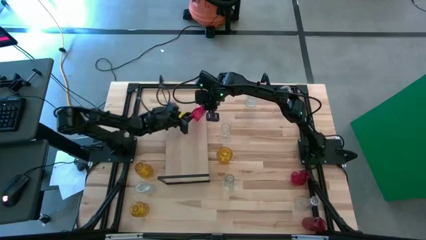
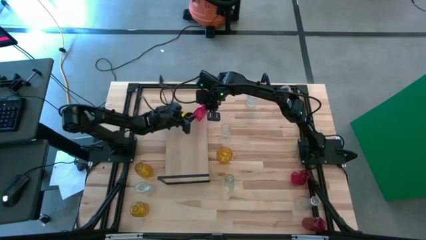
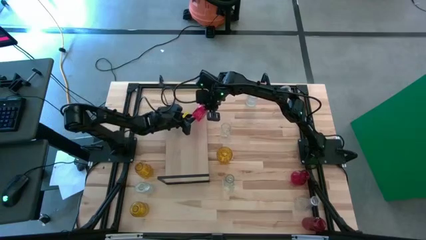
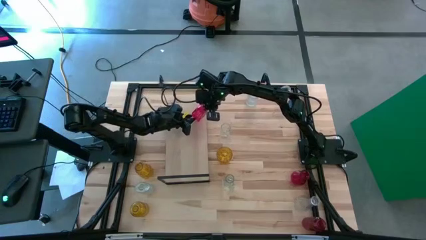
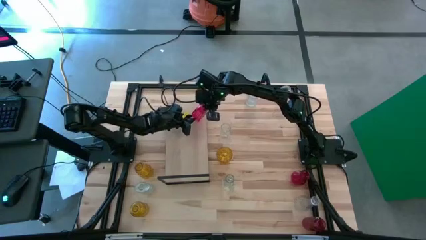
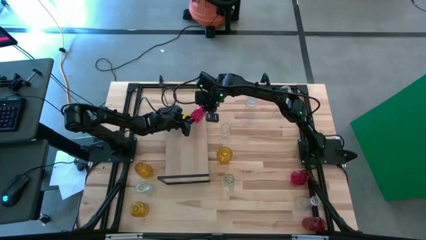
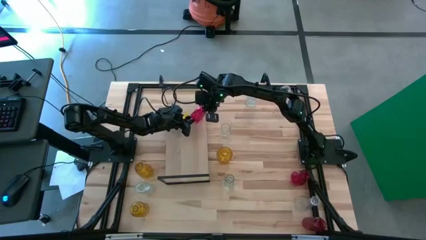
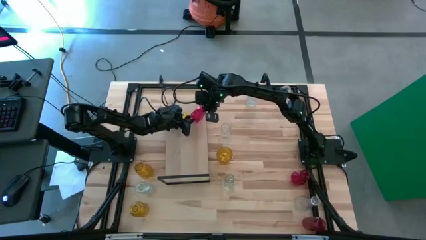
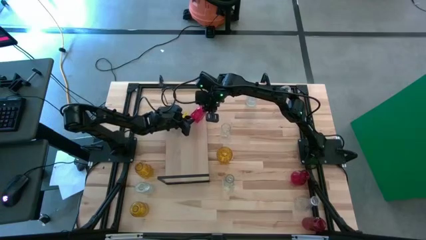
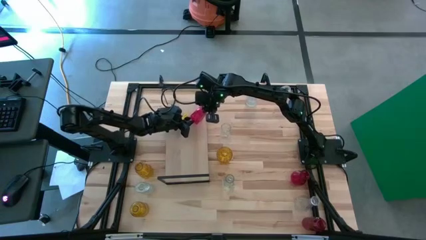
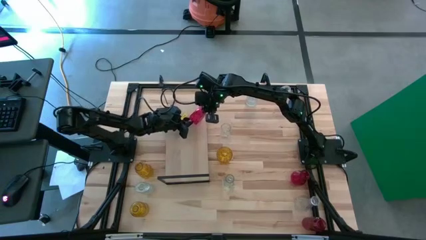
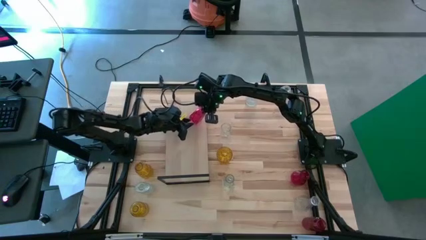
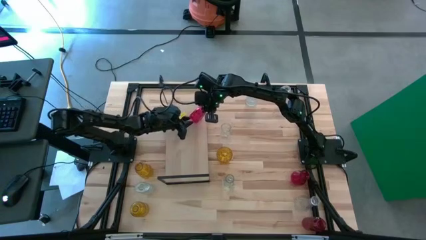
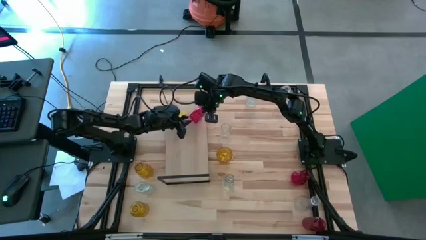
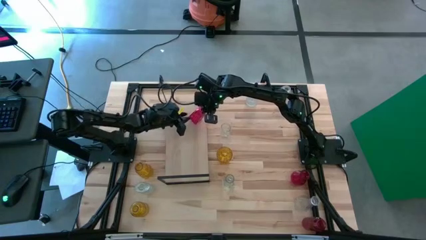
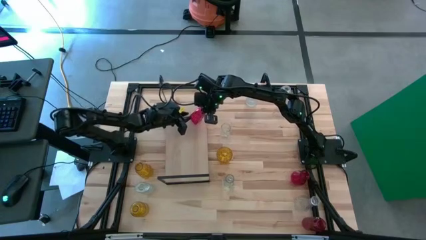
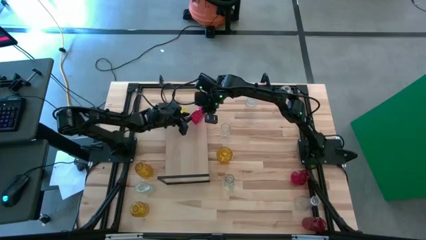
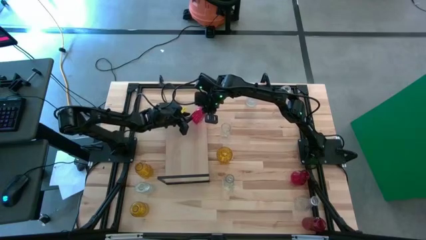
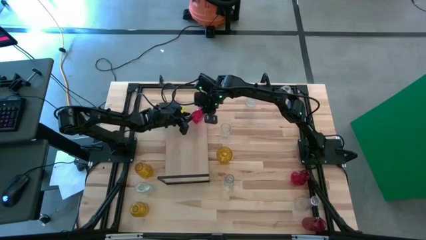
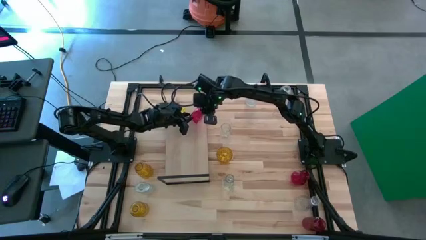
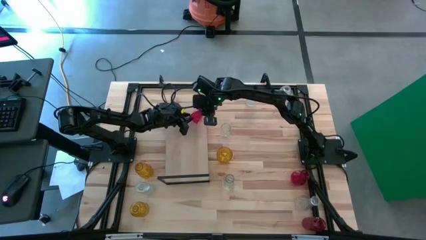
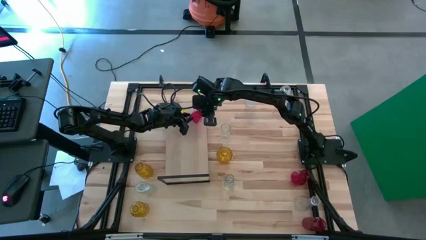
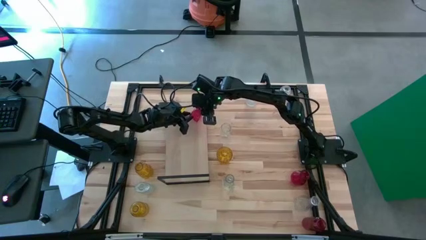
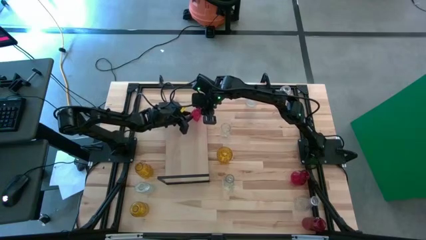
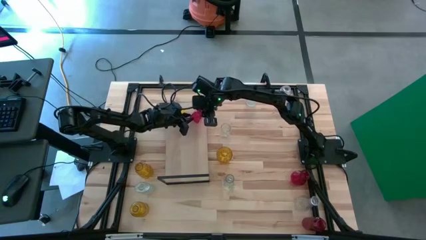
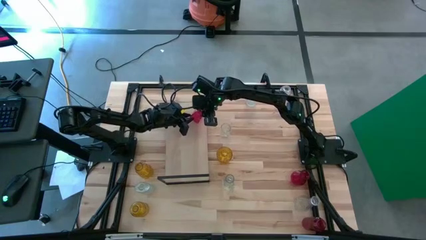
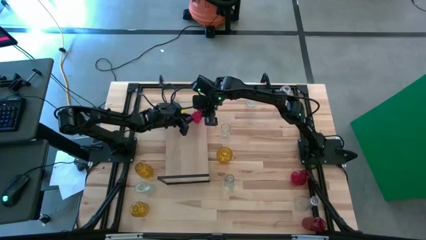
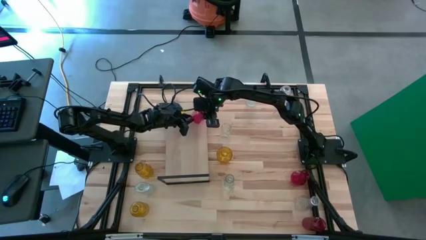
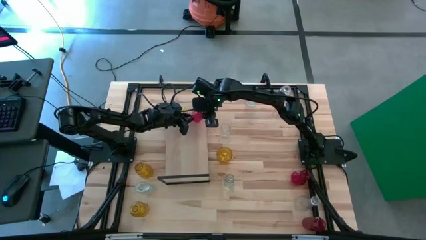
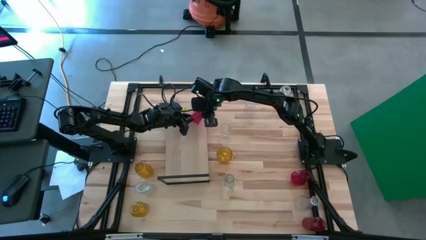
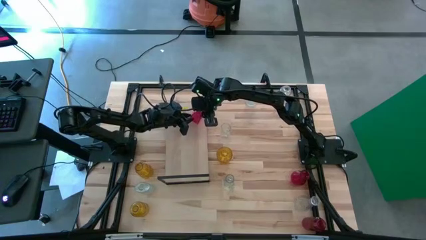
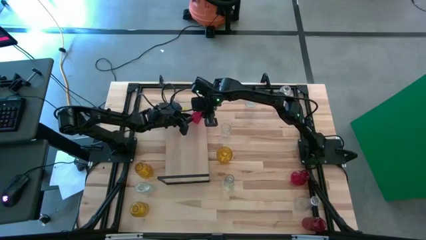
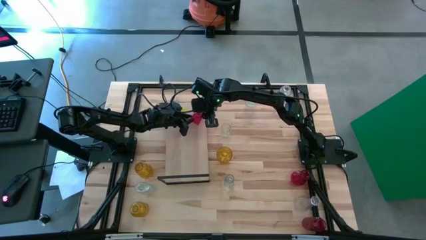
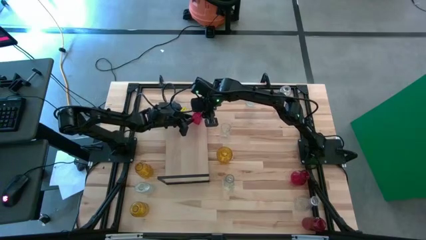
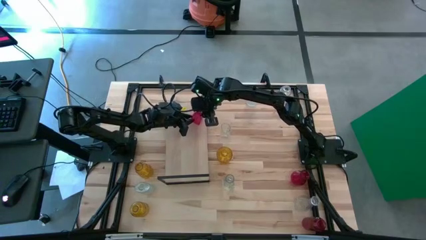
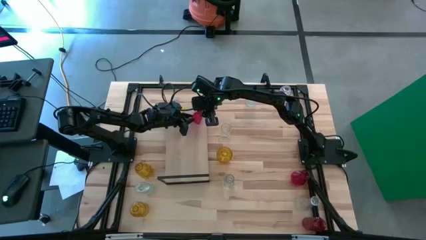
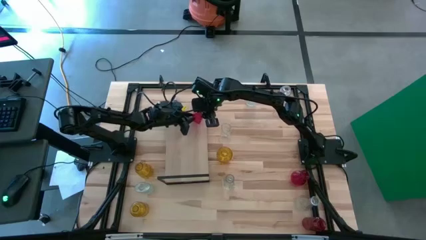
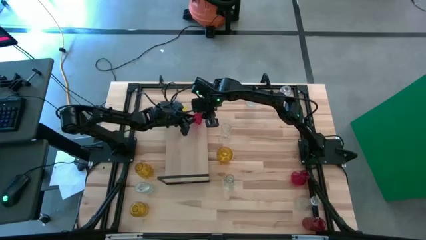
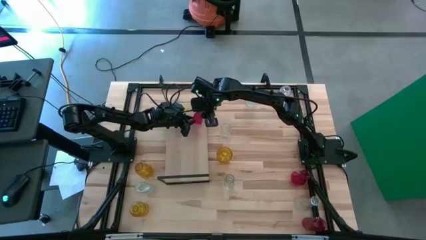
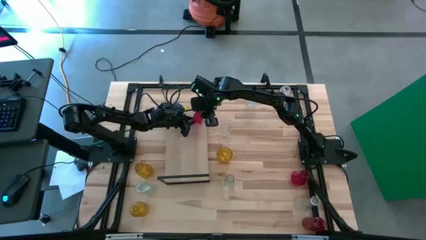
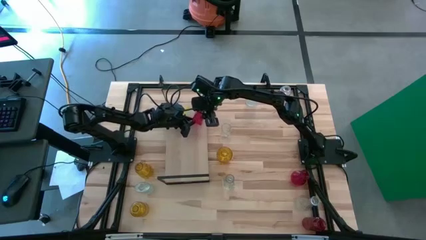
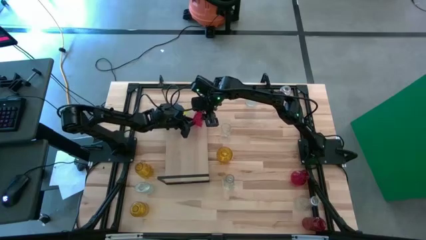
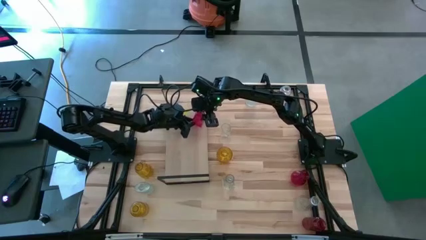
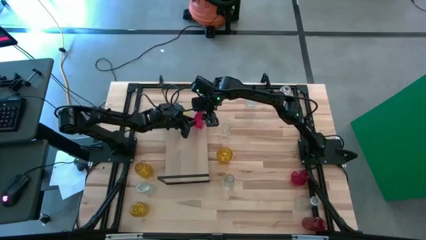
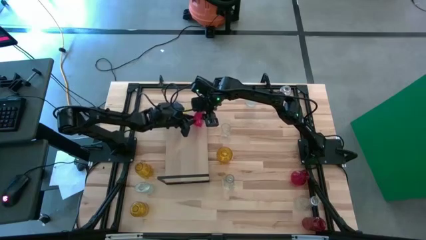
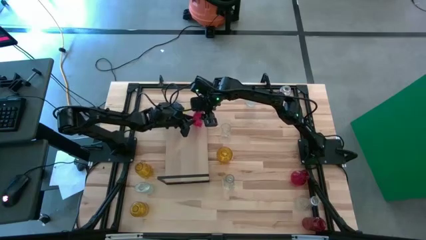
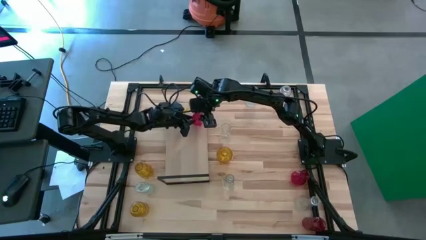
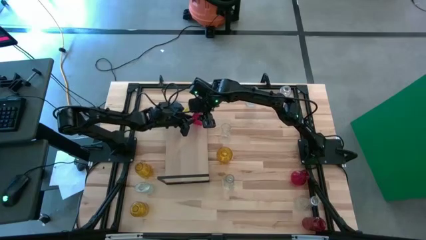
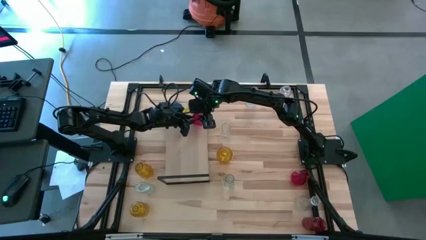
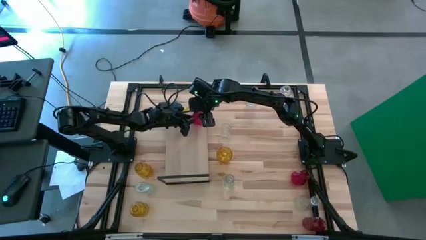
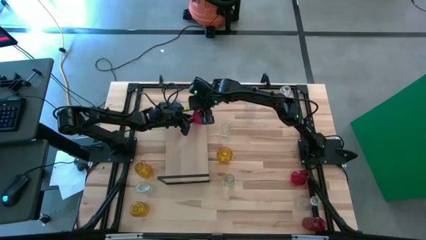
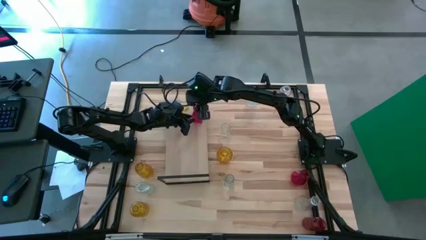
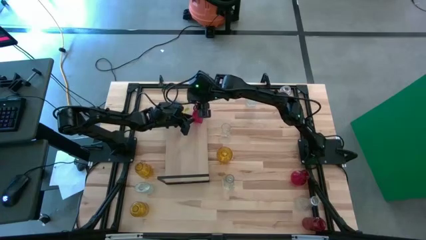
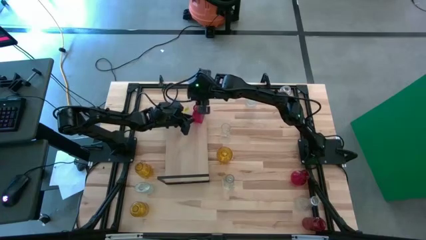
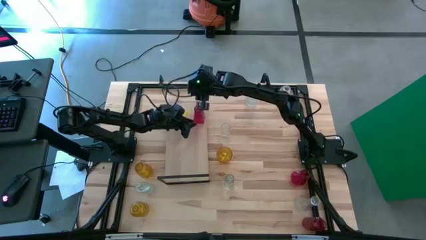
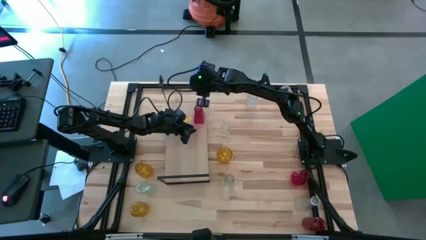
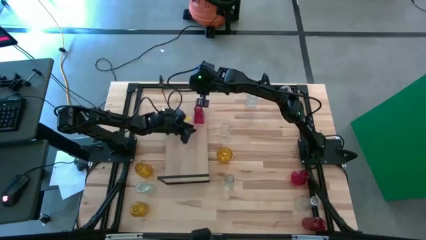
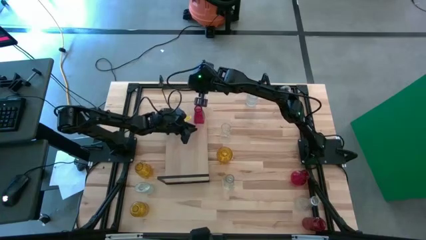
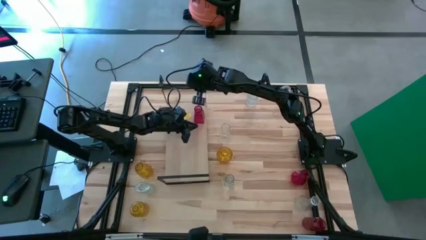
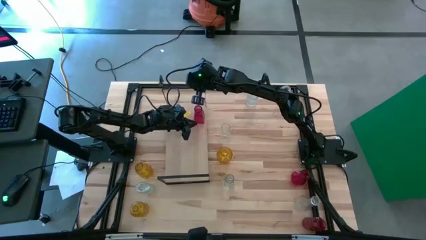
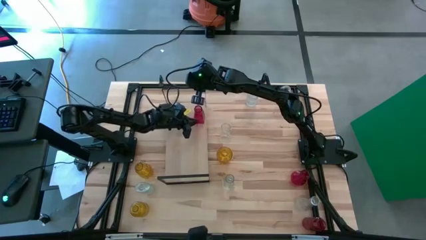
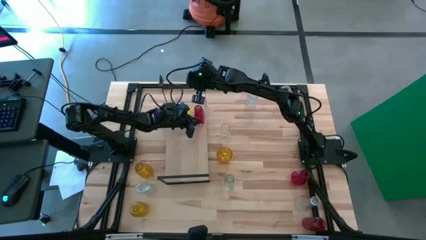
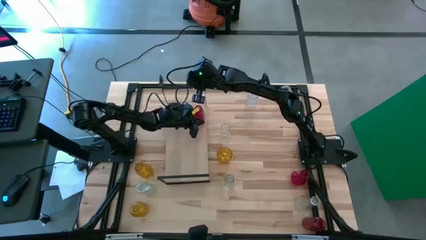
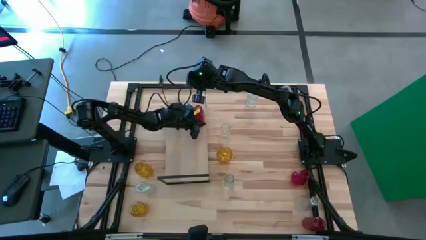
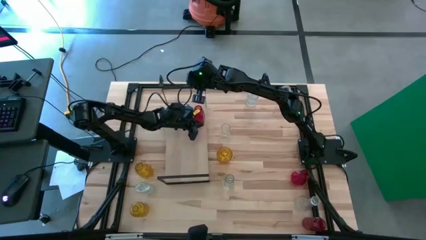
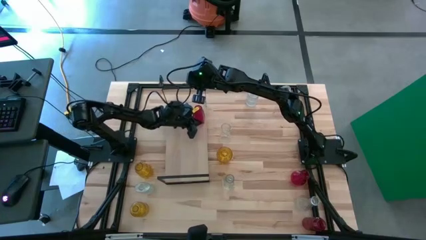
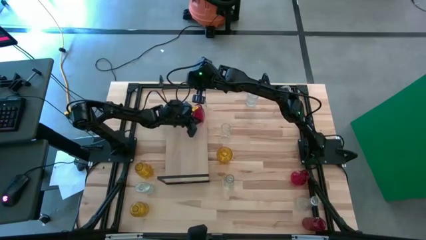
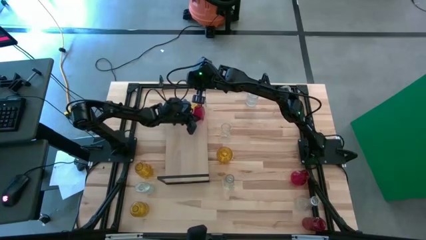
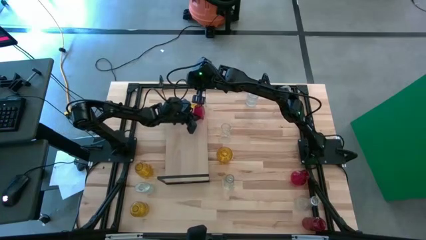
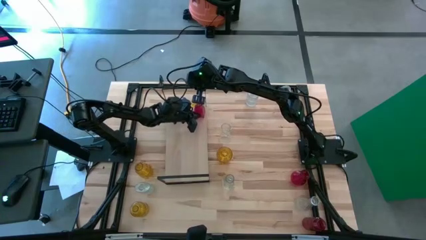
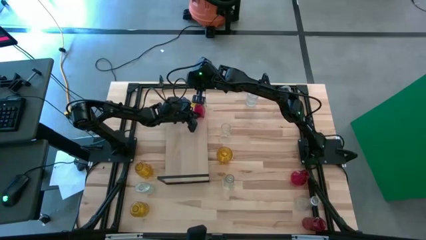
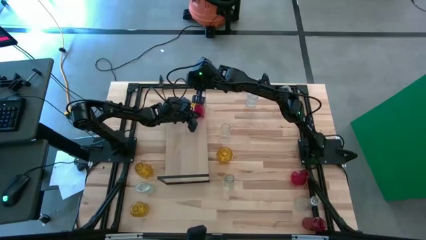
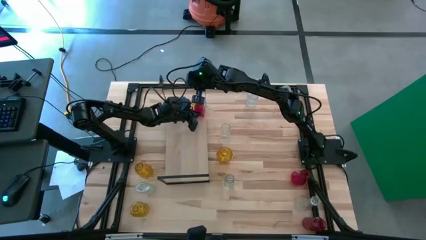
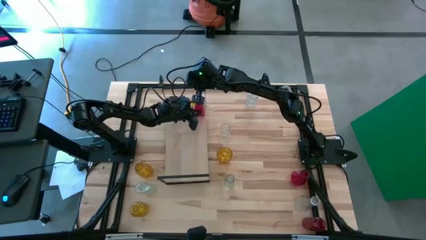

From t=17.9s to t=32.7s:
Task: sort vases onto shelf
Put the top left red vase on the shelf
